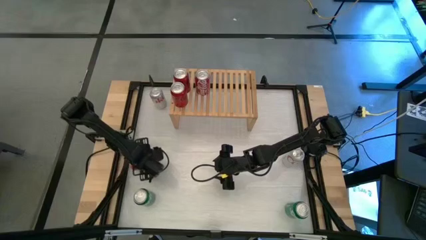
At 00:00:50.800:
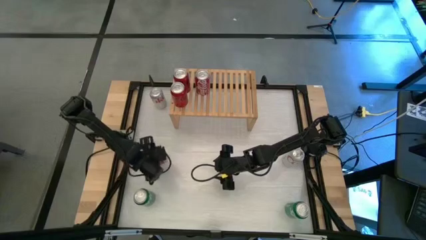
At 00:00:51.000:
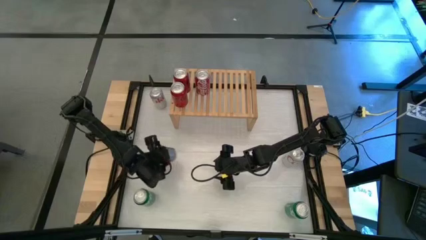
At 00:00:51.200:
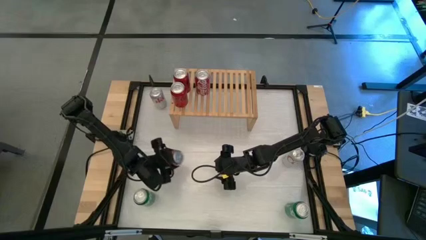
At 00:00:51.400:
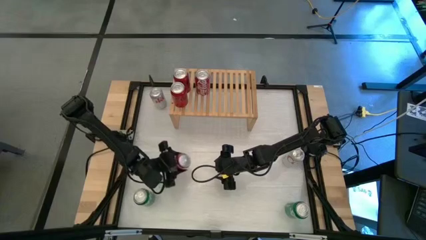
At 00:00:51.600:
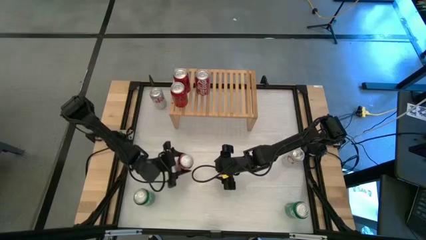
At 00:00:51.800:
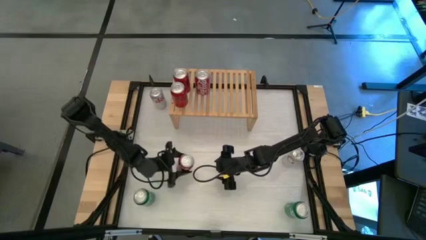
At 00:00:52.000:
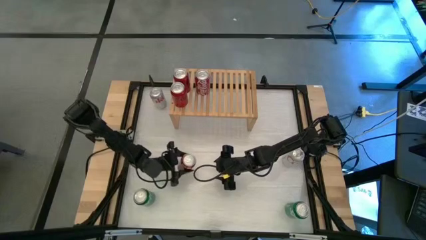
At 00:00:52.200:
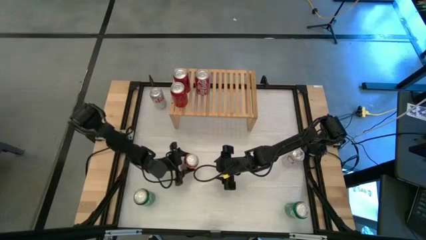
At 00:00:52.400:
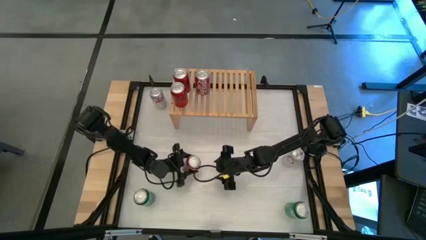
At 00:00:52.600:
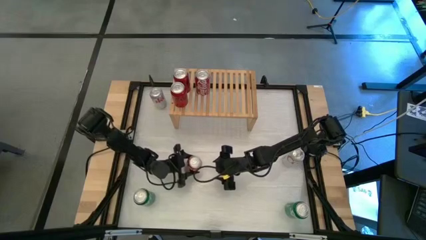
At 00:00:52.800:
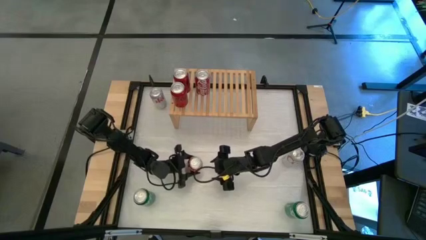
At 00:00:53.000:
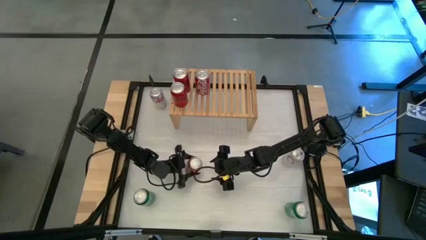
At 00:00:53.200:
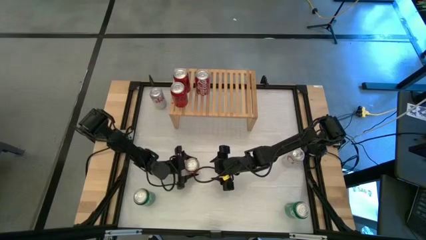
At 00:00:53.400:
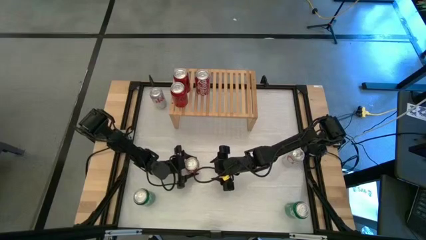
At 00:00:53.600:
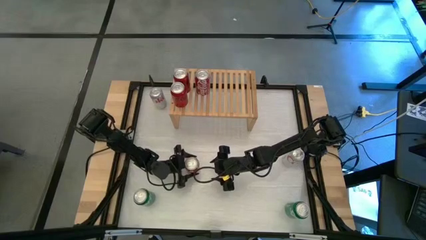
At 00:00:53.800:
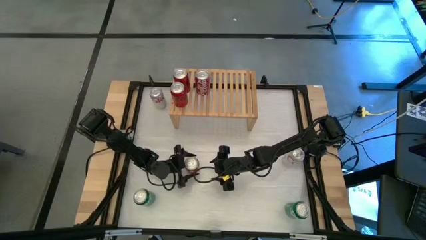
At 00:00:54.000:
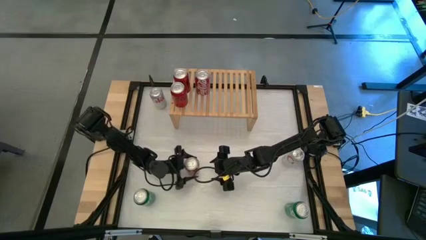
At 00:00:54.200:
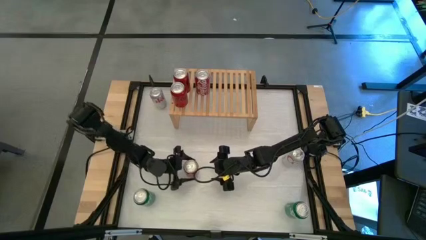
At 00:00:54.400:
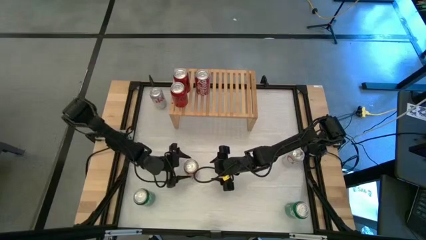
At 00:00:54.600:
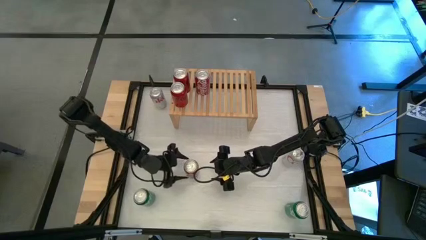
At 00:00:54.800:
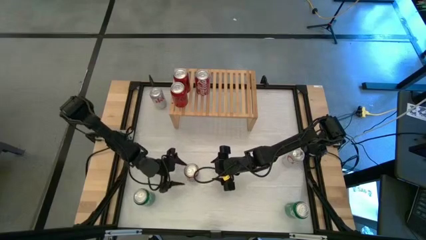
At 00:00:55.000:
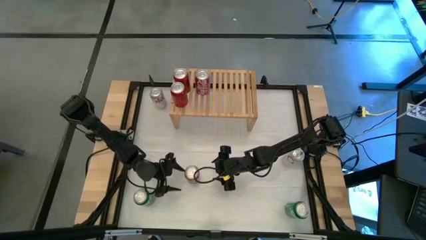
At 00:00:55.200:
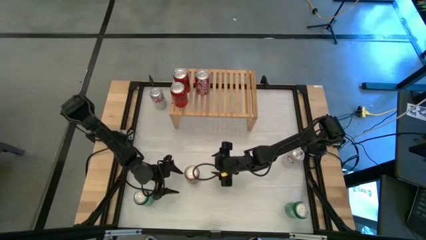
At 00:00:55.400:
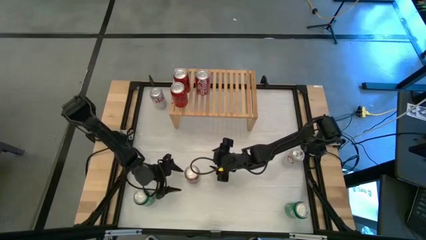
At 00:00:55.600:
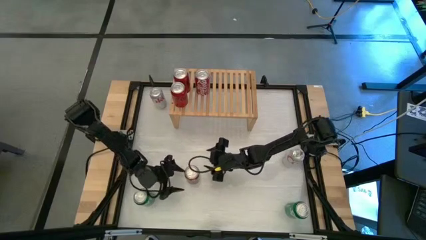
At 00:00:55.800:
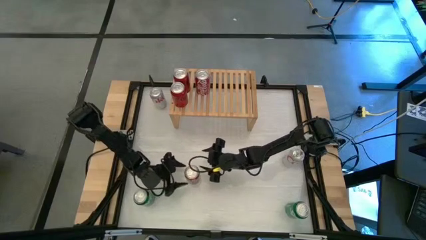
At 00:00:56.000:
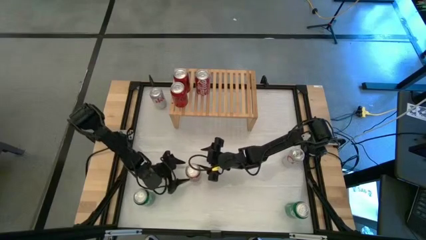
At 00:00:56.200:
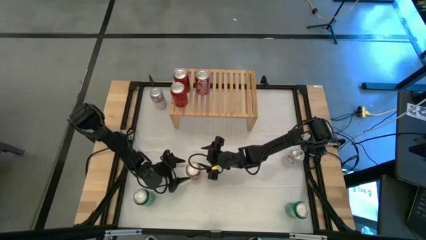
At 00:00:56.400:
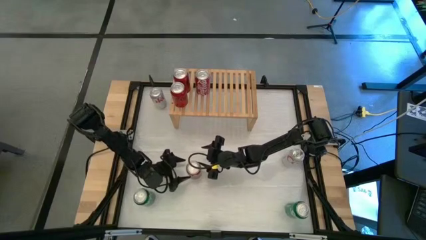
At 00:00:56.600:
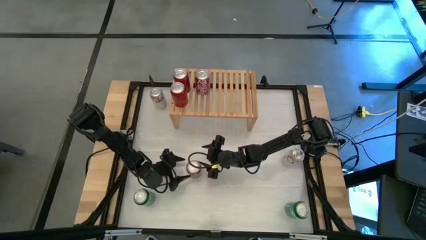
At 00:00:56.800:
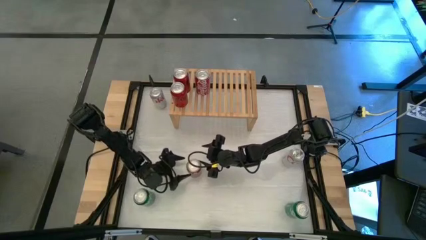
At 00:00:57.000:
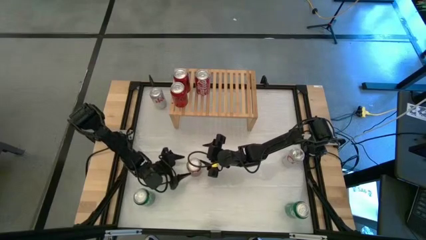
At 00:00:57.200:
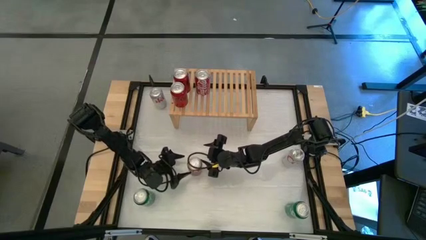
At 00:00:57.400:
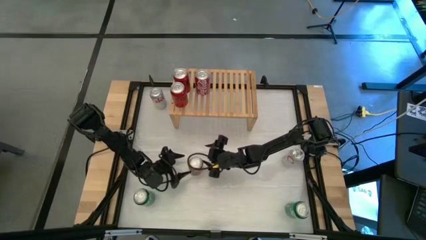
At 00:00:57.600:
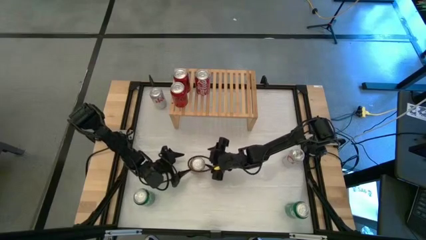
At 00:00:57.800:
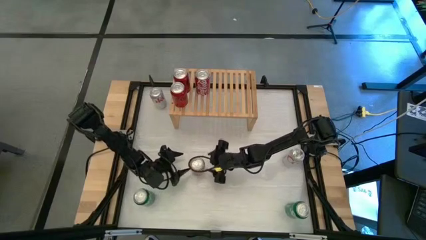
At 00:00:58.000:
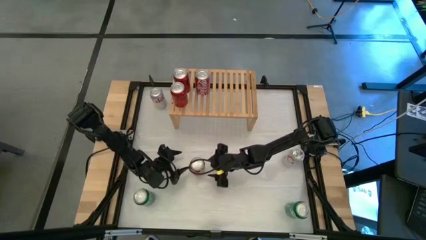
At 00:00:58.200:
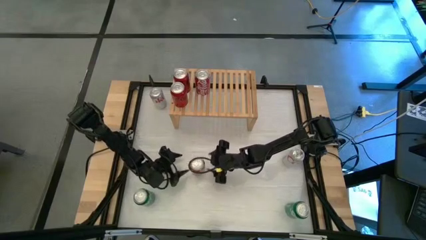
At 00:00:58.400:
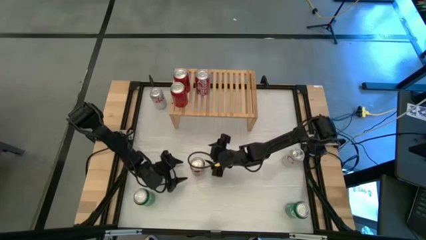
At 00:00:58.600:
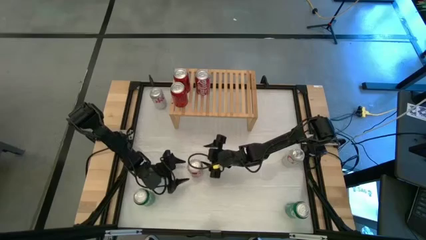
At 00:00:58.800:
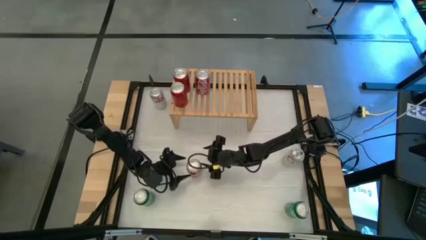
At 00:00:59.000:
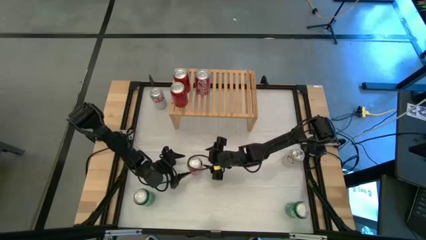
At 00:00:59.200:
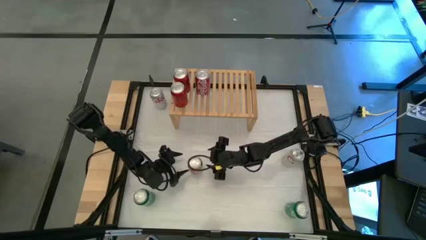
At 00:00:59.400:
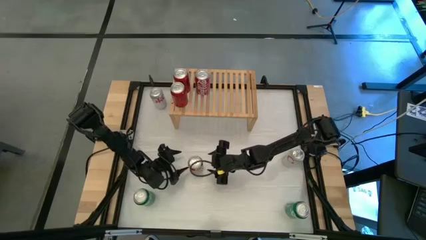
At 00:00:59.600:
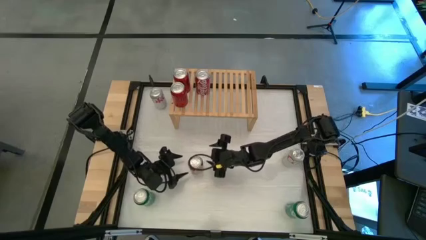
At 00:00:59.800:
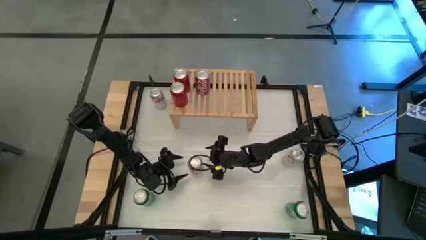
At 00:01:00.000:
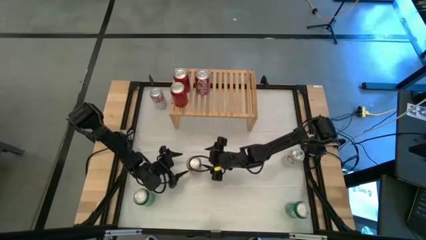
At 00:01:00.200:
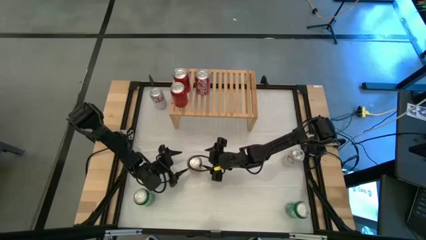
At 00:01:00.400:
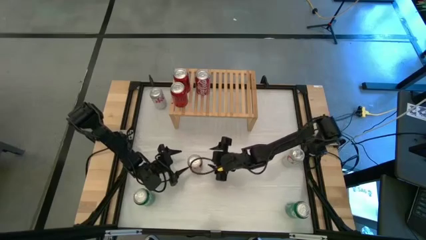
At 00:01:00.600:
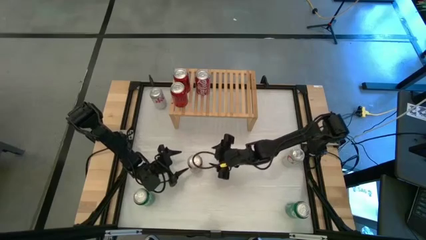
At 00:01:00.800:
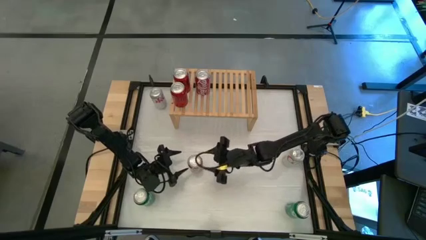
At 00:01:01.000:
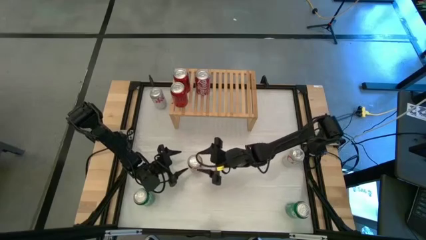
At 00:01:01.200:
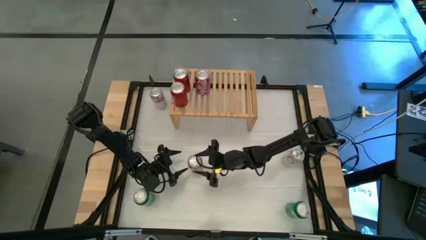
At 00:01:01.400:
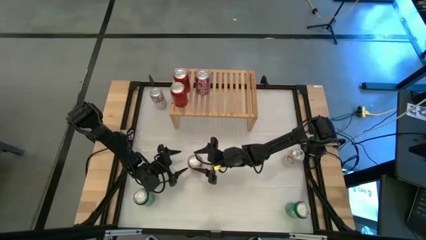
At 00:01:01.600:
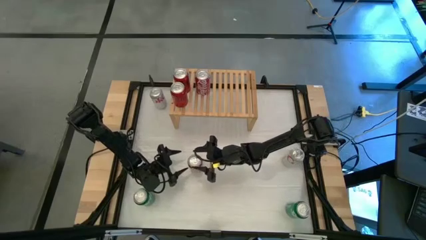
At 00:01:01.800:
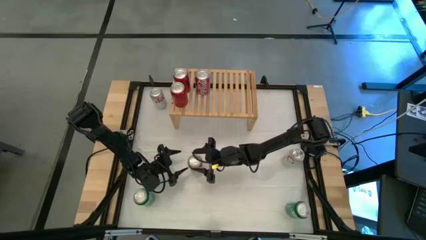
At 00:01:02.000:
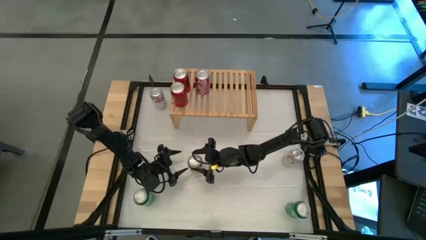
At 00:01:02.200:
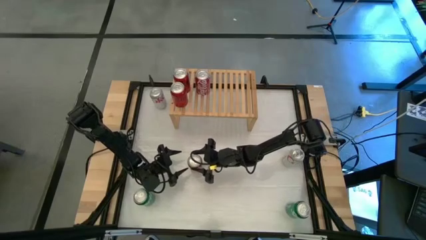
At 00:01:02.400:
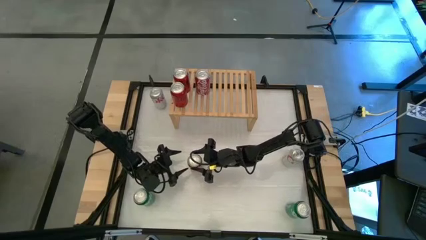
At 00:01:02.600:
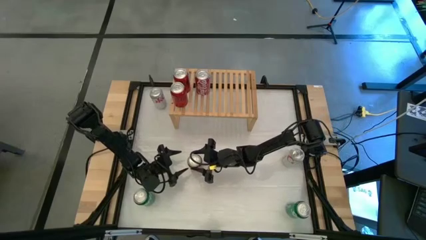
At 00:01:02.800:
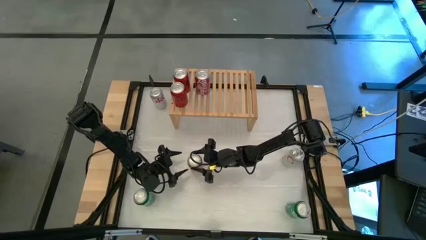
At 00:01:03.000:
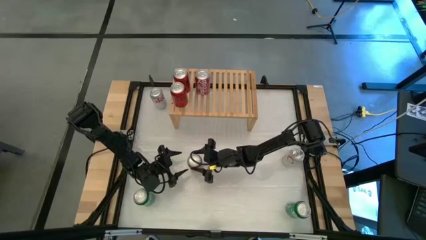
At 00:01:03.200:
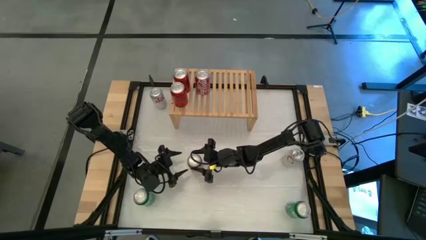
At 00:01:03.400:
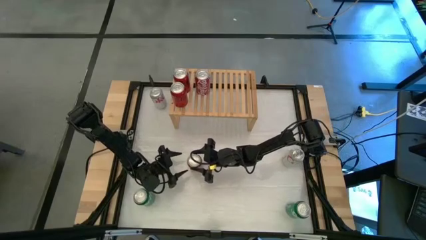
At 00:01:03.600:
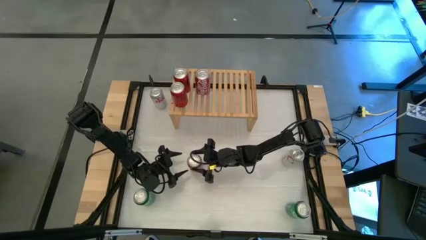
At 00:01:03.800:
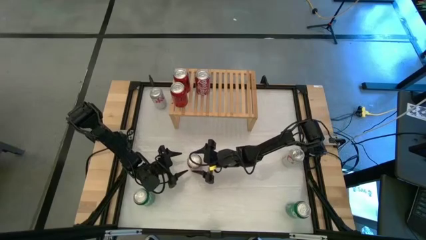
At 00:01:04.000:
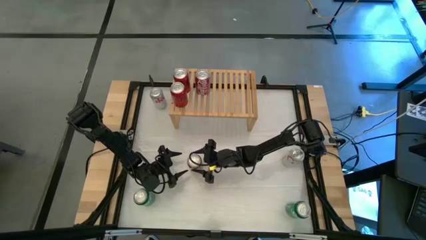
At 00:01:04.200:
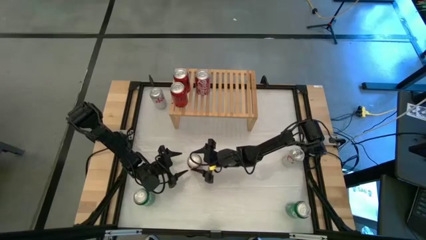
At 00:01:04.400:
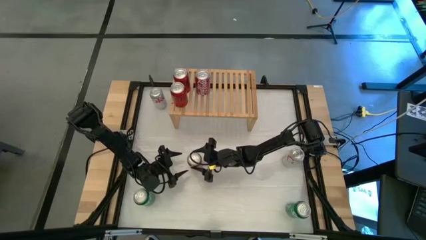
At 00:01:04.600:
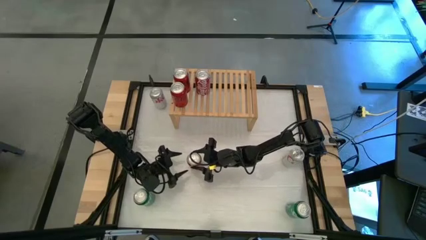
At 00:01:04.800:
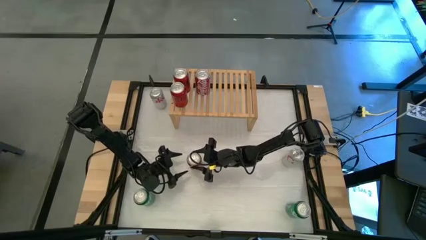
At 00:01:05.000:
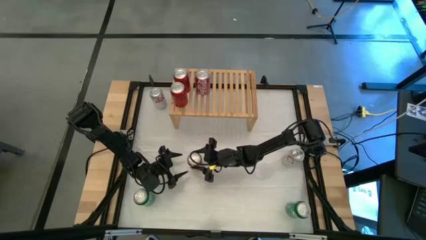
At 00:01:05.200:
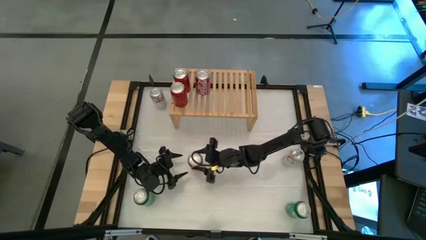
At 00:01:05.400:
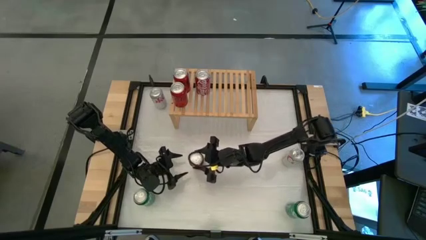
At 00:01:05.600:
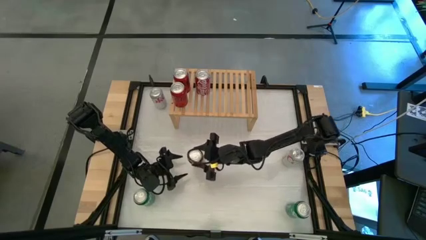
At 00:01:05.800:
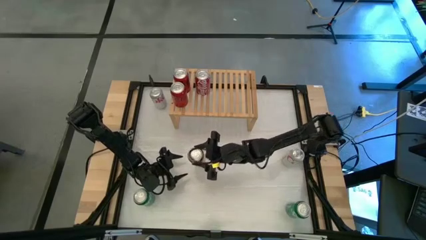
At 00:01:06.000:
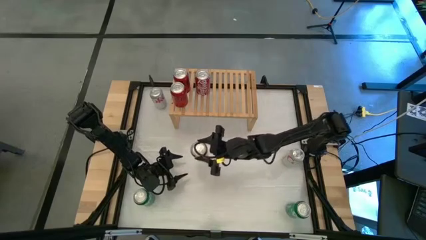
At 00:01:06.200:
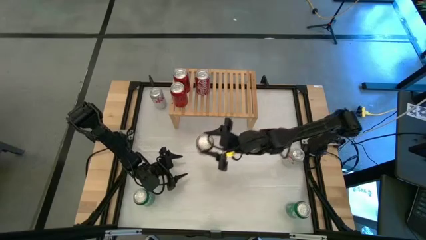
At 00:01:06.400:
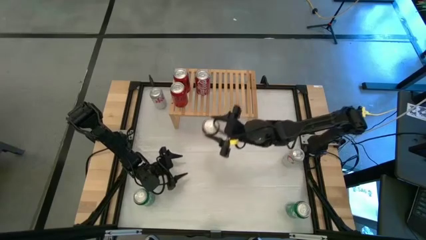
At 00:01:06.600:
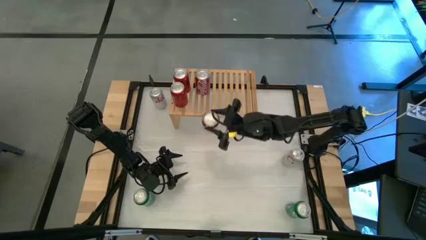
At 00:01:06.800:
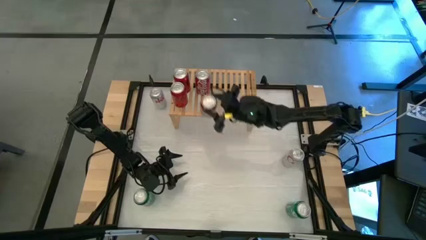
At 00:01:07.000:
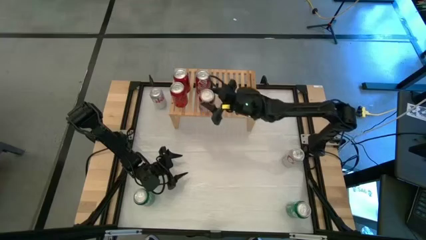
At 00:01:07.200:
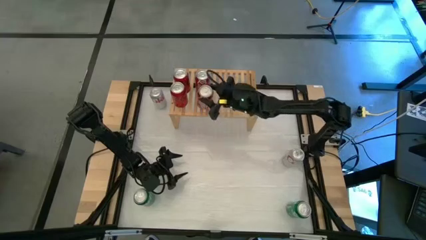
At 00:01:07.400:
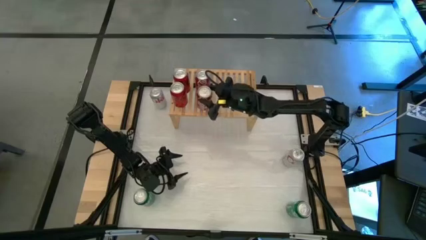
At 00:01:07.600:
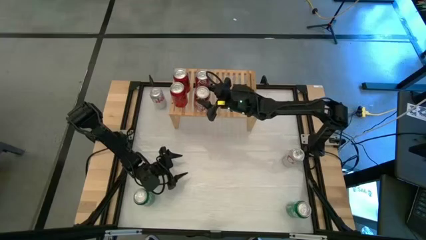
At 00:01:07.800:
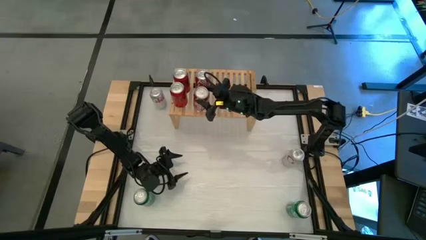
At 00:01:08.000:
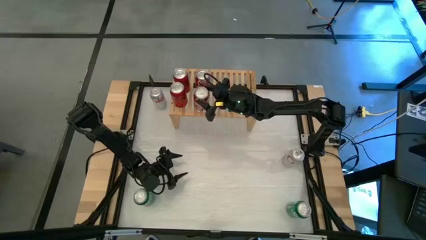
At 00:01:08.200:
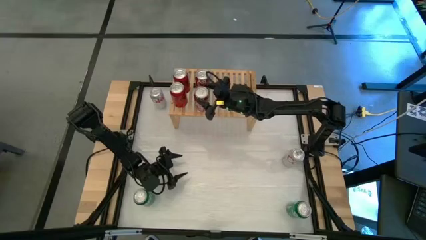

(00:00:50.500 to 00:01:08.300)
Task: Place canned beverage on shelf
Put the red and white soda can on the shelf aligned with the other red and white soda can
